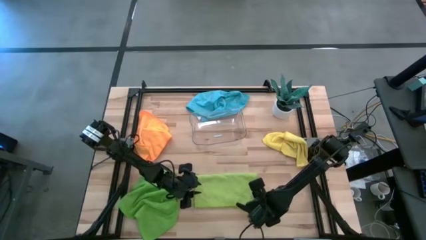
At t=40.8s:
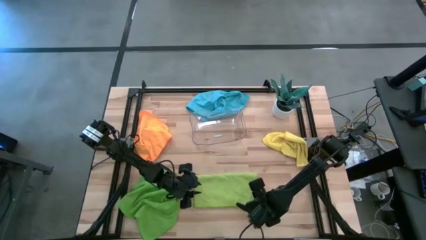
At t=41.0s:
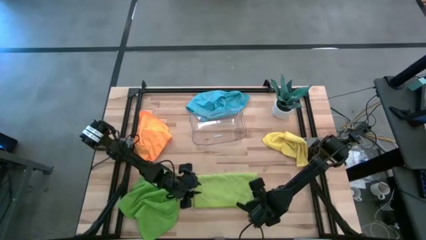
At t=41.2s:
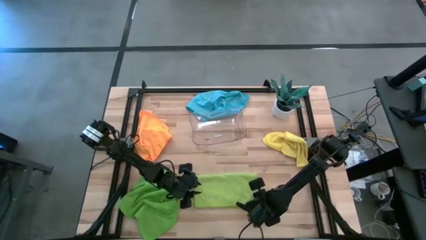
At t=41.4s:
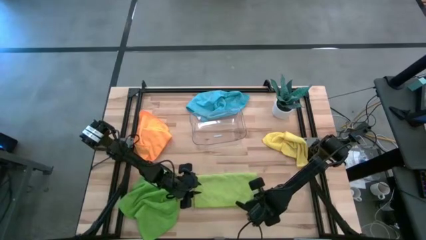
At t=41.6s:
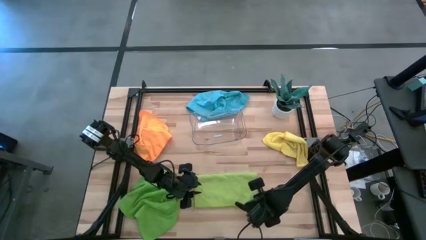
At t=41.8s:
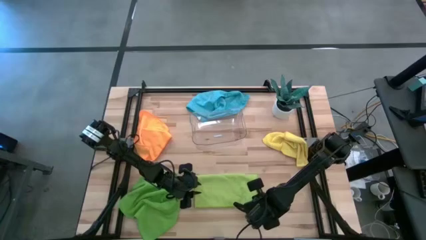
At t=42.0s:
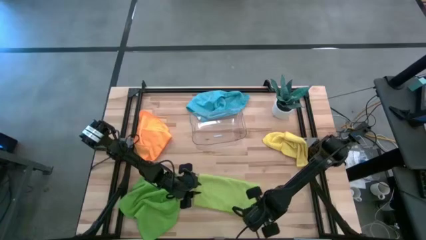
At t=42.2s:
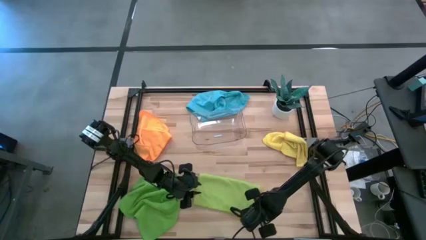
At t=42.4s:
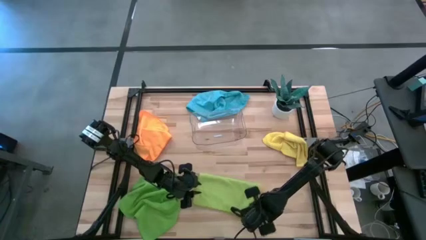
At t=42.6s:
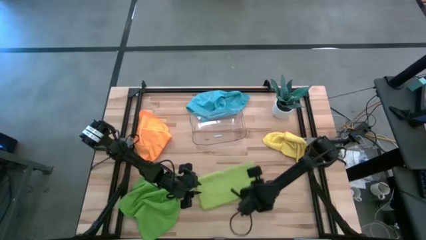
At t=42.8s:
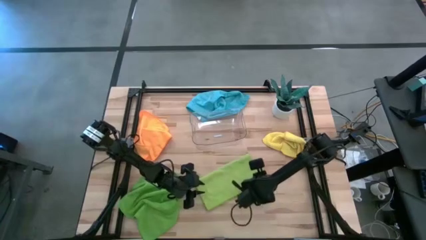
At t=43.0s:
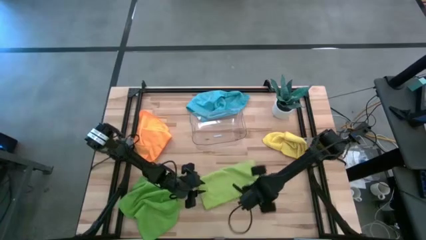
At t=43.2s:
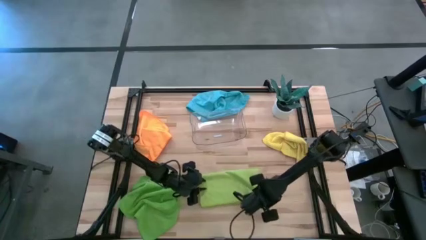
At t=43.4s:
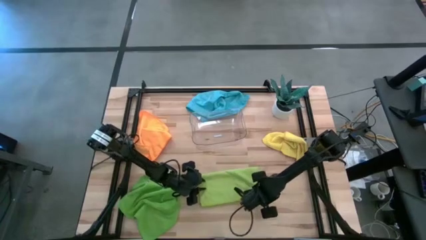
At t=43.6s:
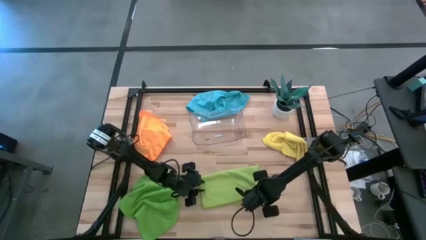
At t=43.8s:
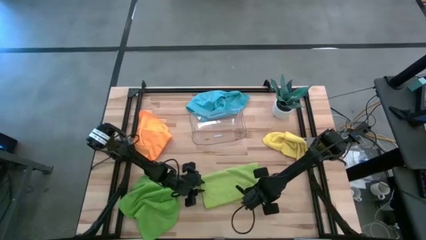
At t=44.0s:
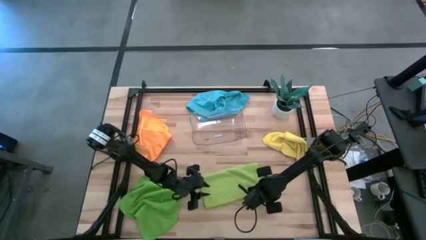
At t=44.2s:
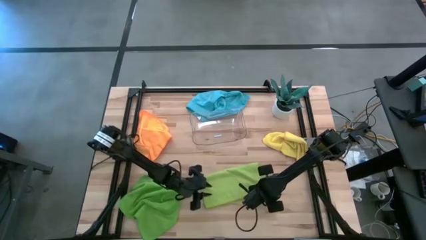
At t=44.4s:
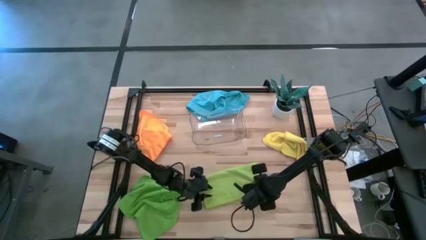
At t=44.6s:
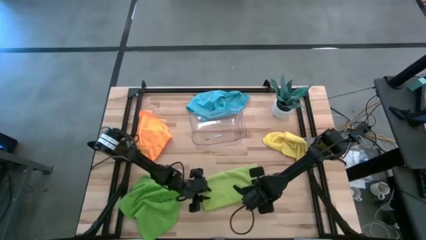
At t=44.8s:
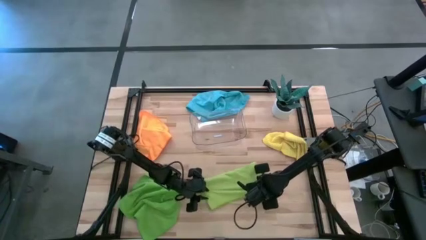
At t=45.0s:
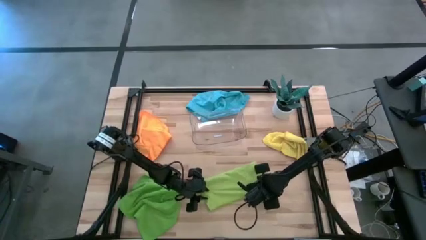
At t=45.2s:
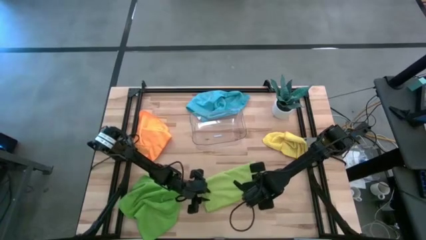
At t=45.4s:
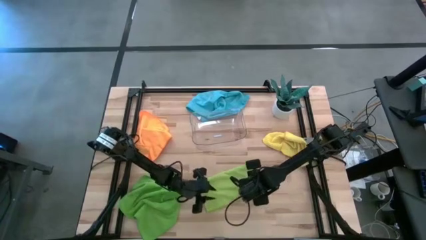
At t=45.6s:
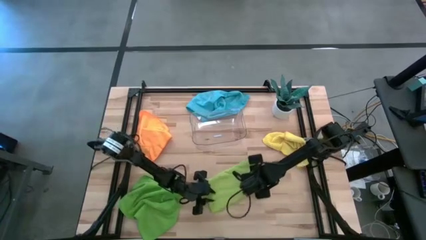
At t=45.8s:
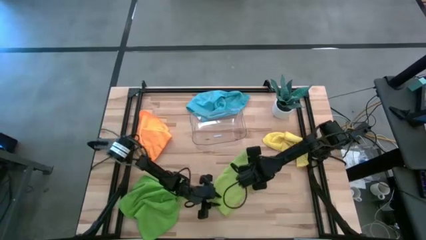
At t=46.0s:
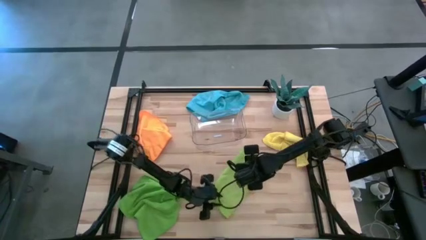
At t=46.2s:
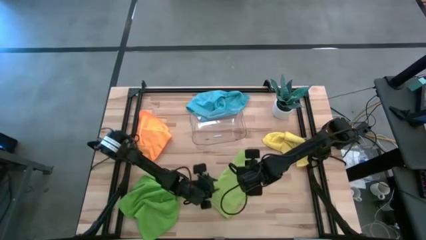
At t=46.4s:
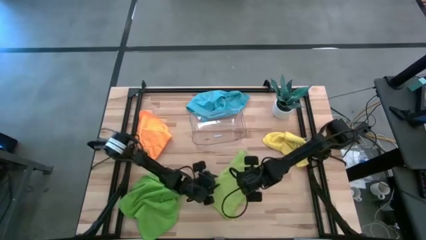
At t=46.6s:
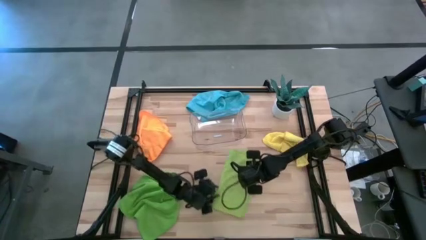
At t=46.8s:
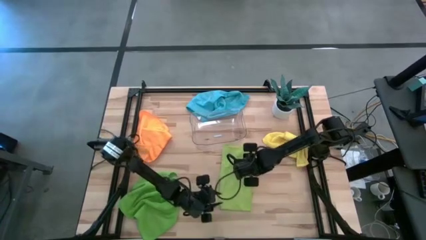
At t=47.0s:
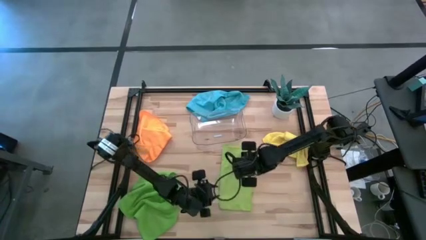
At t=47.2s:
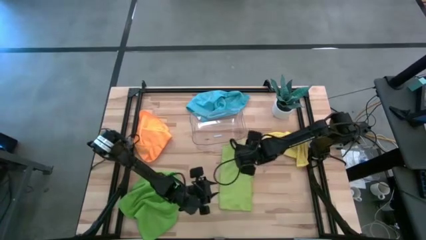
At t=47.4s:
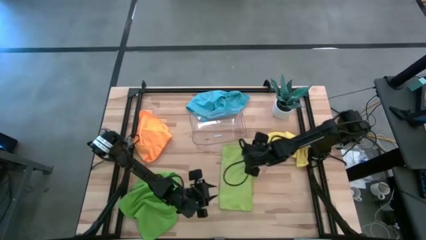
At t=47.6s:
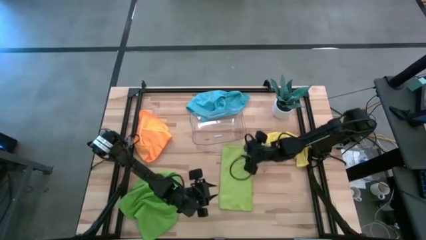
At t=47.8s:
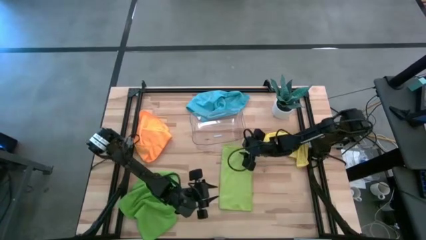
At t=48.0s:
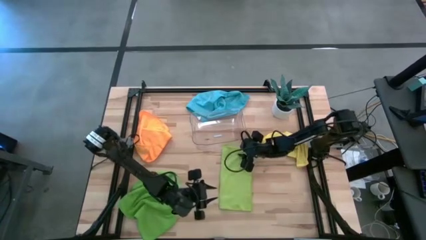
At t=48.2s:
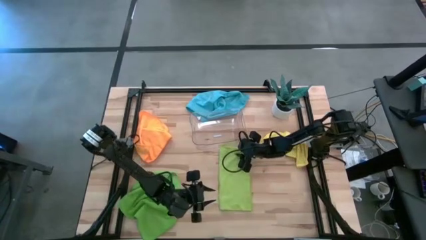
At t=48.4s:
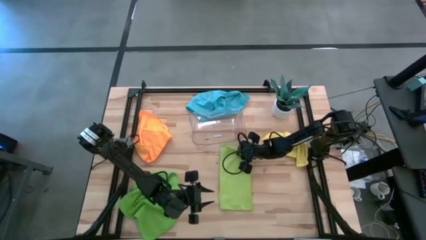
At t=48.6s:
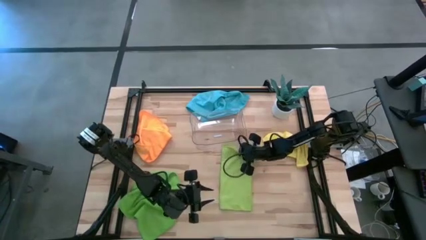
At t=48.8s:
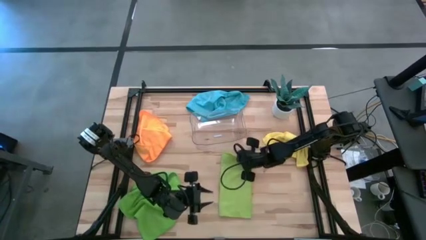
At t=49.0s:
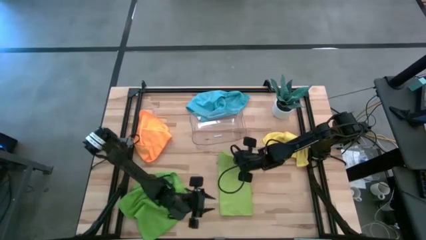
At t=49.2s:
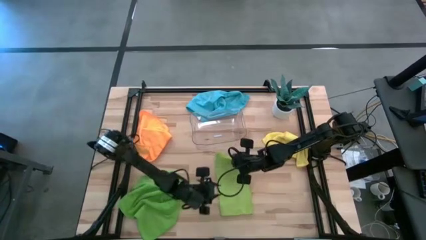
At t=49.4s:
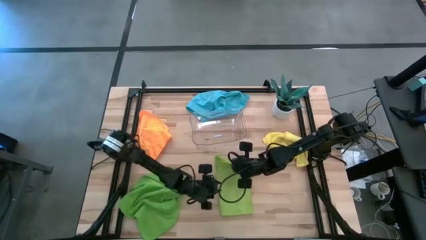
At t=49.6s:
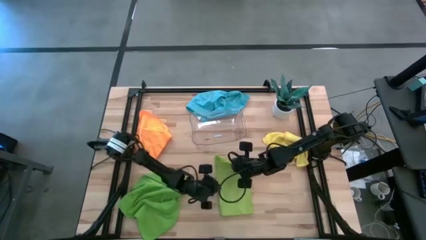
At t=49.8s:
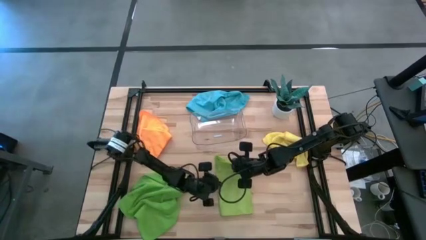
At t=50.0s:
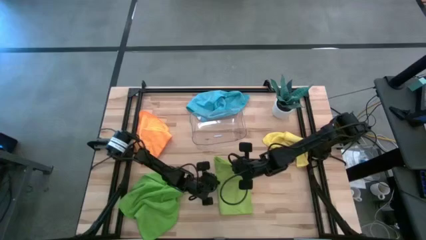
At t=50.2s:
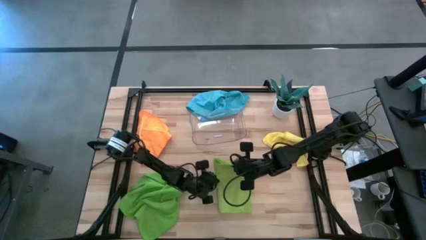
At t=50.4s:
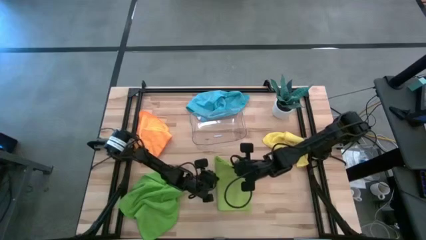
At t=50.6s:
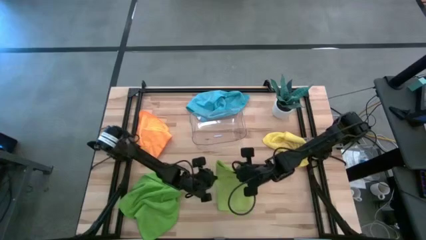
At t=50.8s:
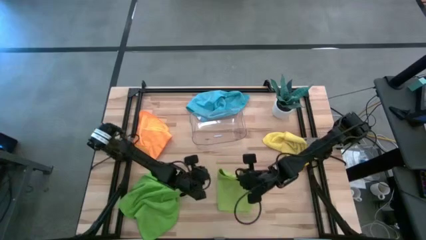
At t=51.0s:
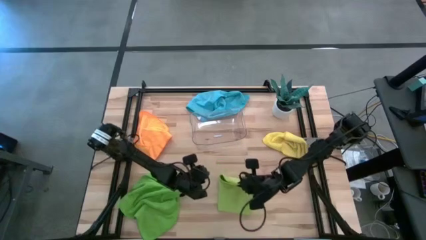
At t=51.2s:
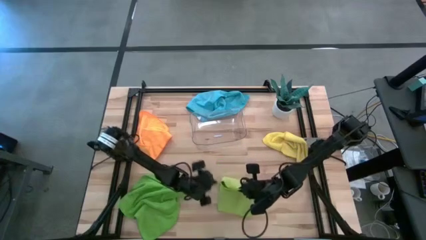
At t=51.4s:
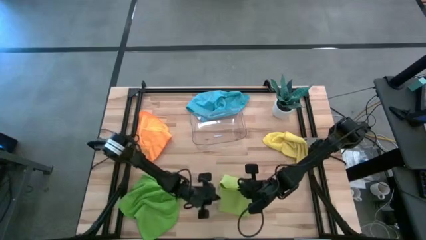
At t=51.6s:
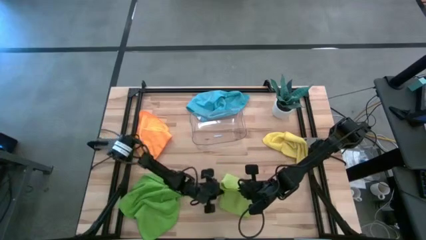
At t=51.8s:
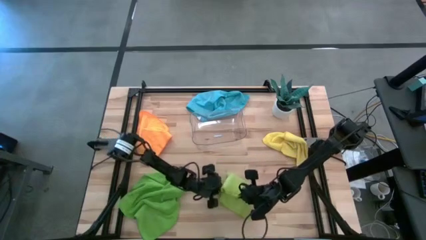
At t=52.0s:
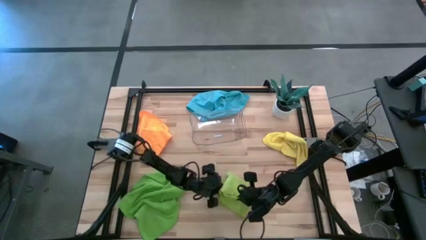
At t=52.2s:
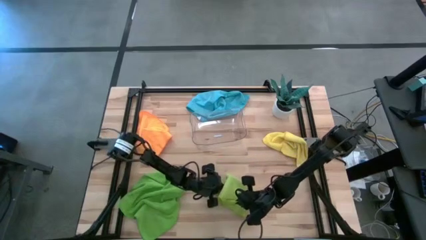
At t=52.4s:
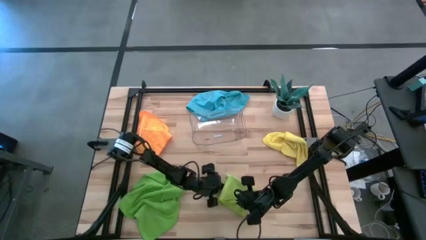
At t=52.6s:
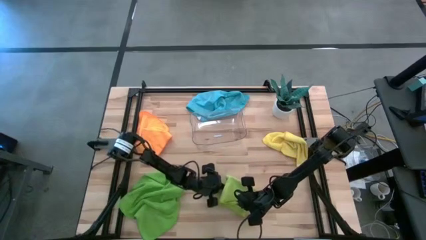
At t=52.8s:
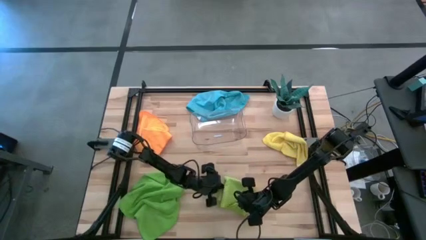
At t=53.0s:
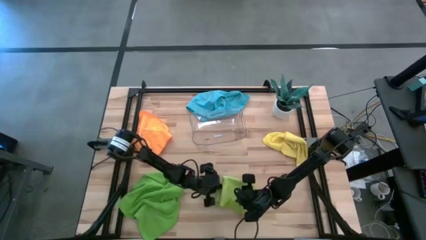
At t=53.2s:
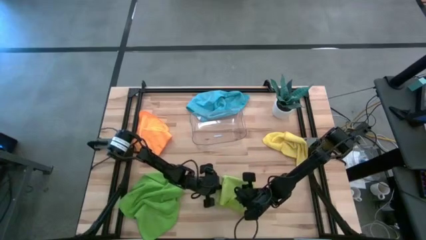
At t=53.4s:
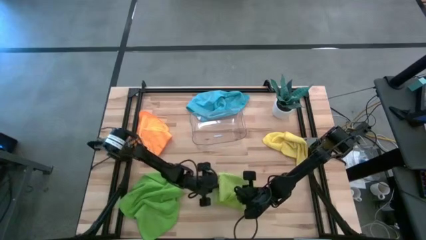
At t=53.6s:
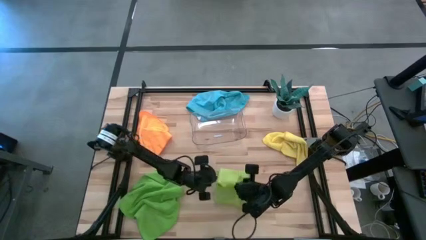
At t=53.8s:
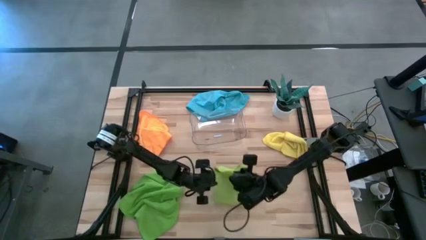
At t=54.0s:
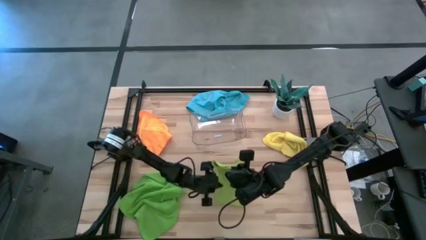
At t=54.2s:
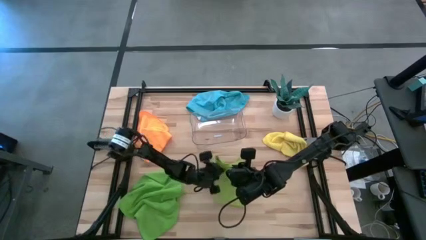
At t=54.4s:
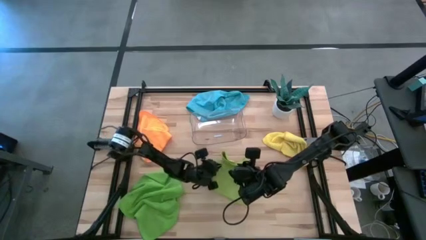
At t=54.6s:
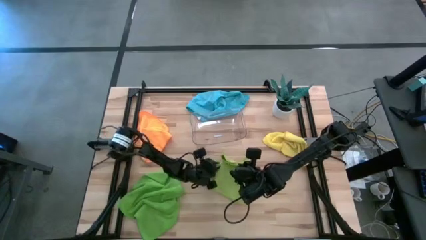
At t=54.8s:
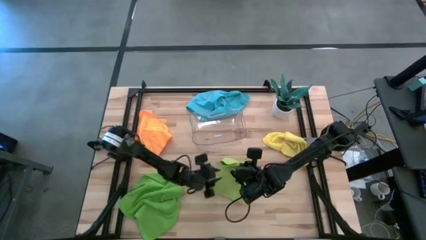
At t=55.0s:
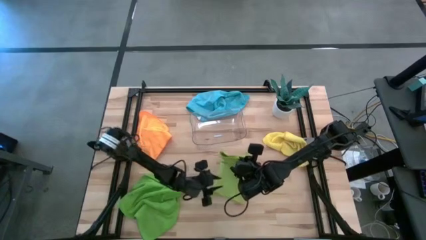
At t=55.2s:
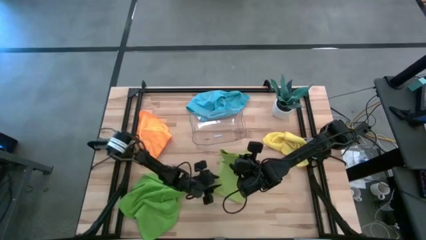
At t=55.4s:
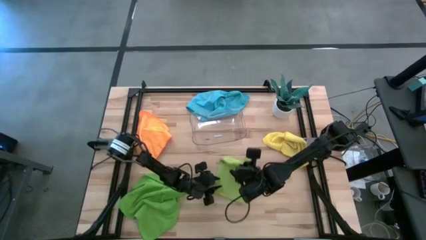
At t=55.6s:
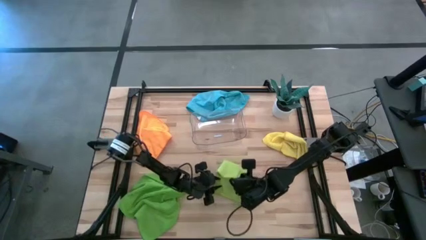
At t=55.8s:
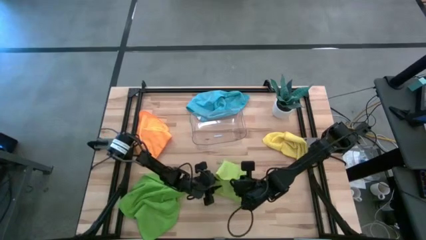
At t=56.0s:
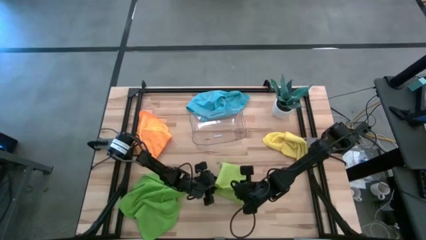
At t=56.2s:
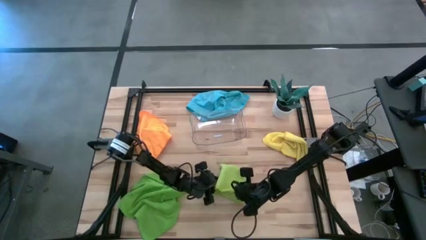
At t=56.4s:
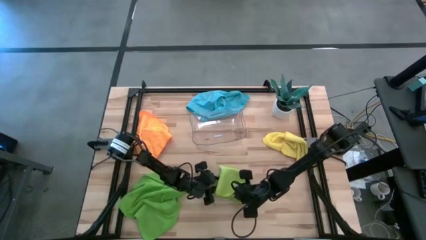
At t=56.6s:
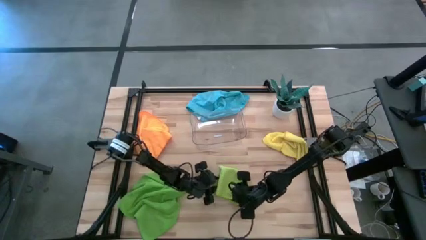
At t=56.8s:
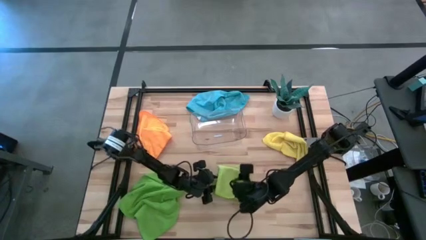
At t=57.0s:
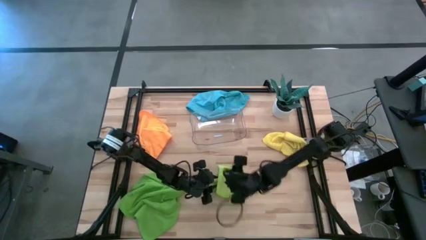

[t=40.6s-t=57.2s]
Task: Fold microfiber towels
Fold the light green microfiber cloth
